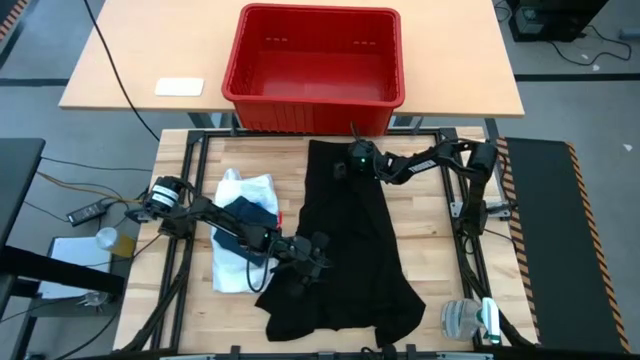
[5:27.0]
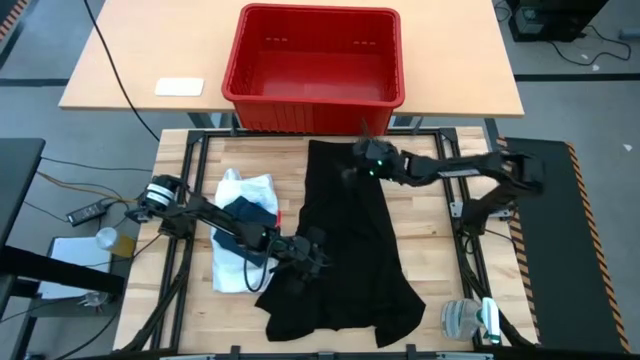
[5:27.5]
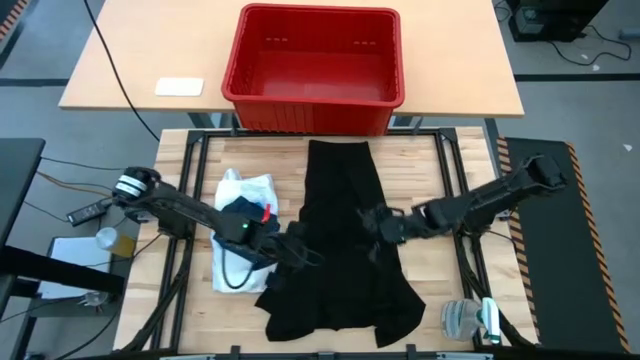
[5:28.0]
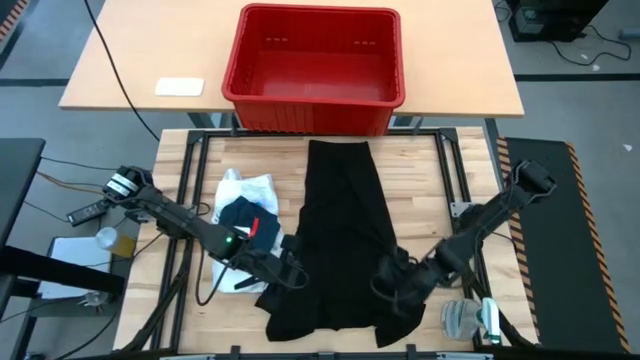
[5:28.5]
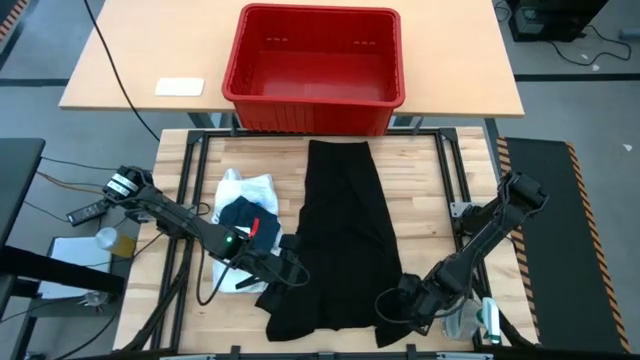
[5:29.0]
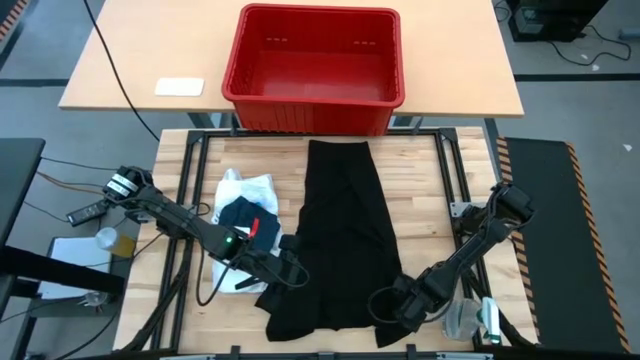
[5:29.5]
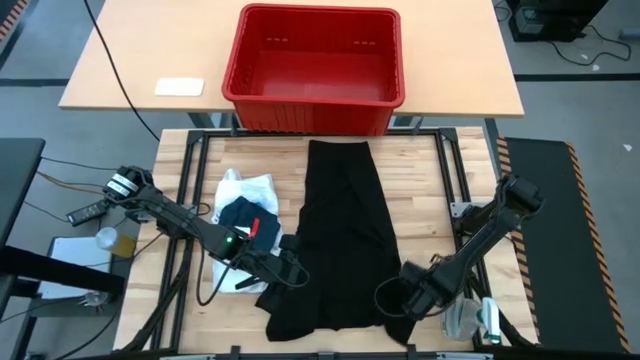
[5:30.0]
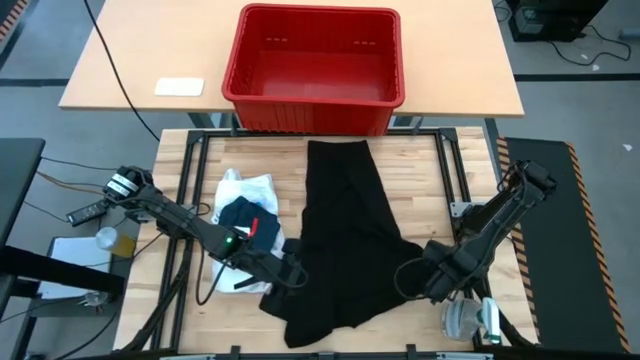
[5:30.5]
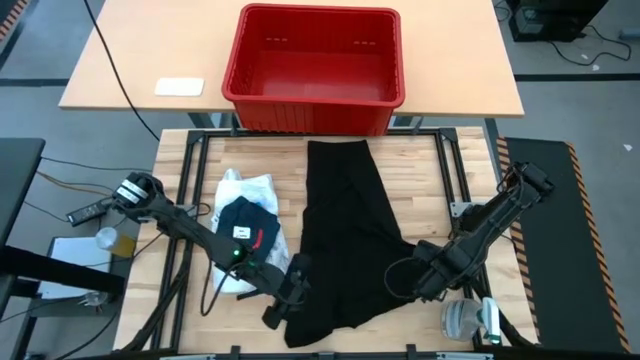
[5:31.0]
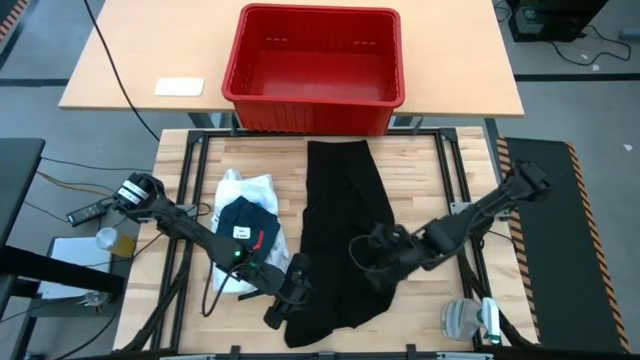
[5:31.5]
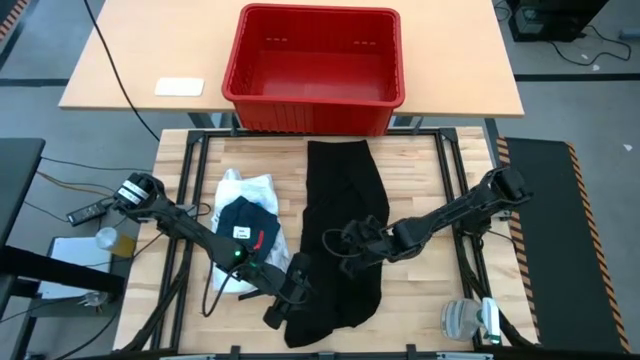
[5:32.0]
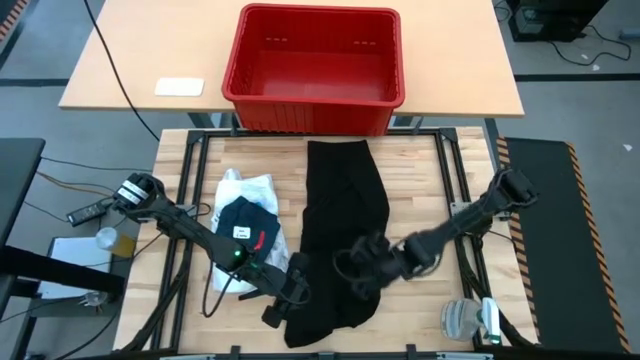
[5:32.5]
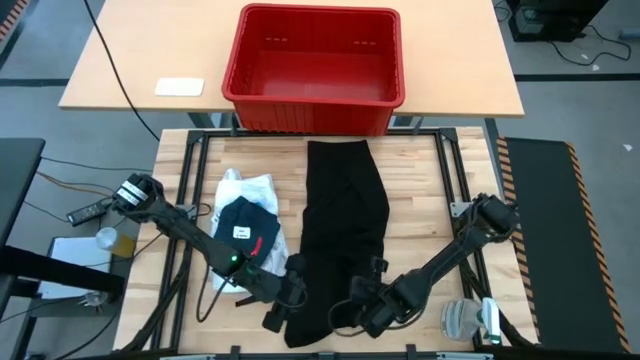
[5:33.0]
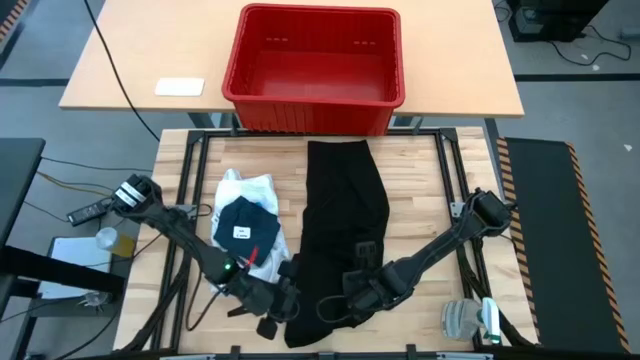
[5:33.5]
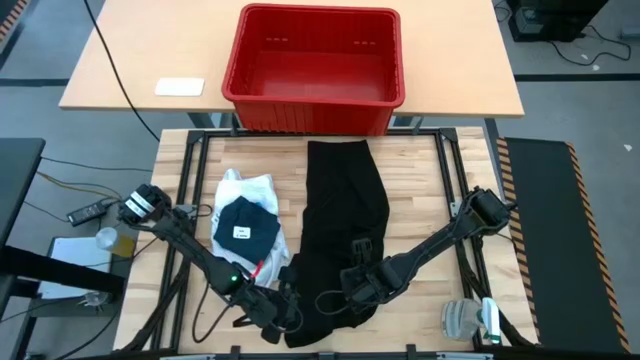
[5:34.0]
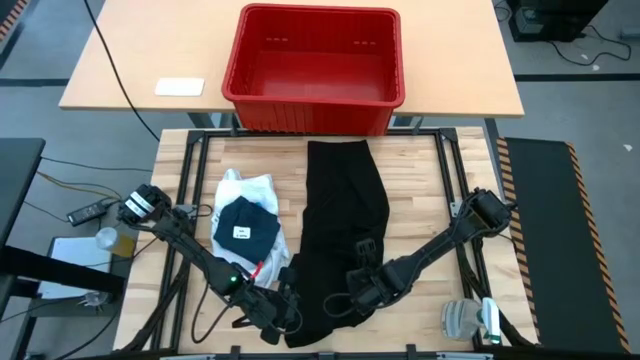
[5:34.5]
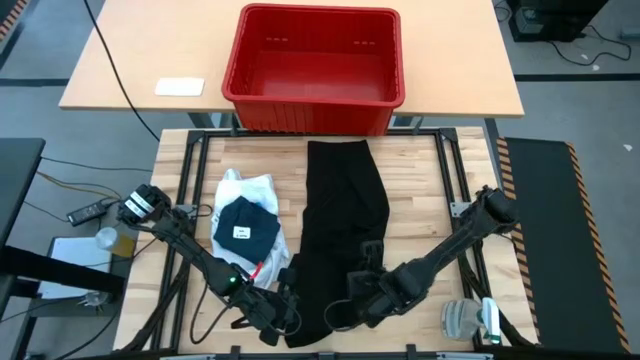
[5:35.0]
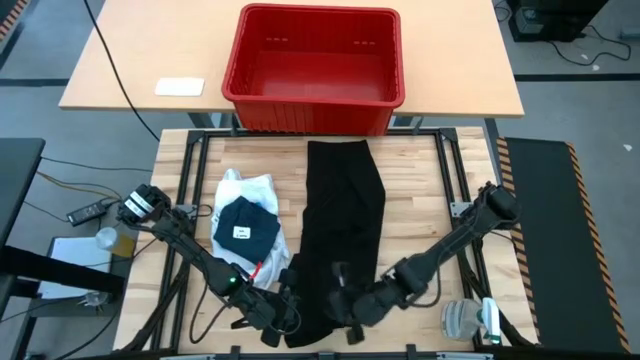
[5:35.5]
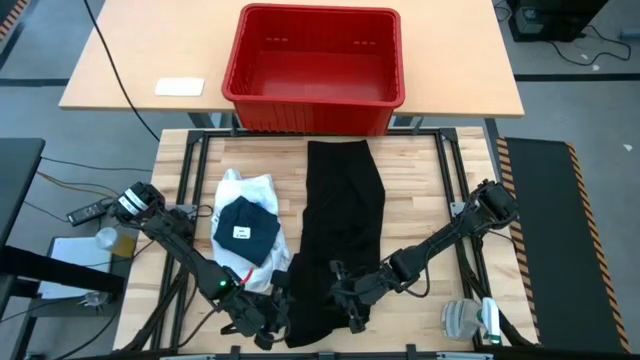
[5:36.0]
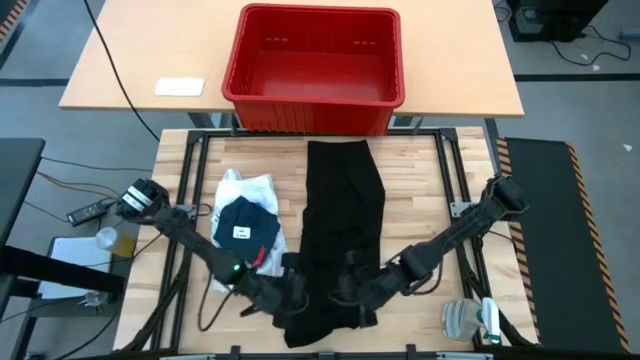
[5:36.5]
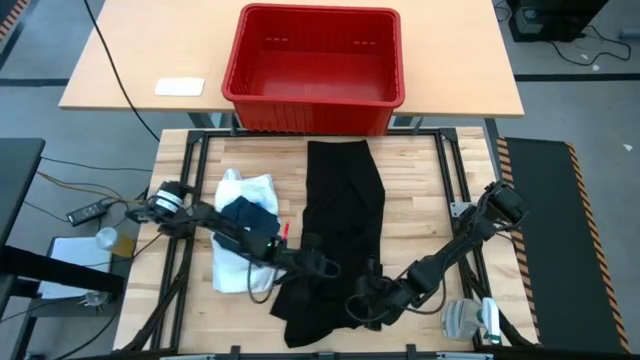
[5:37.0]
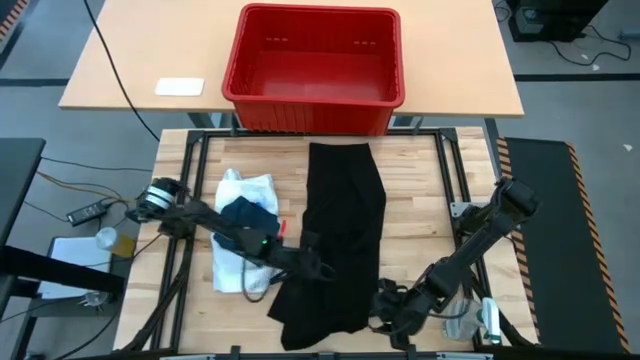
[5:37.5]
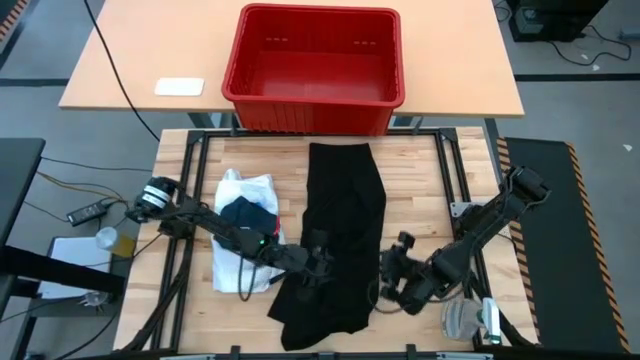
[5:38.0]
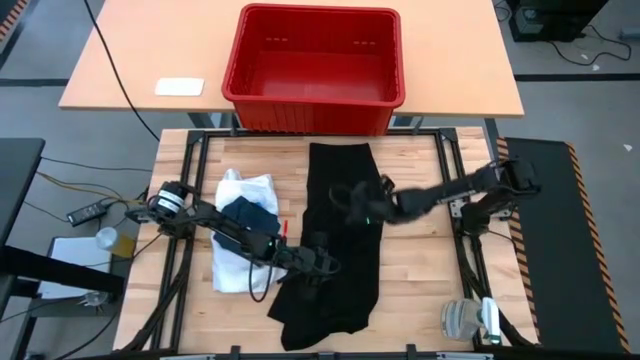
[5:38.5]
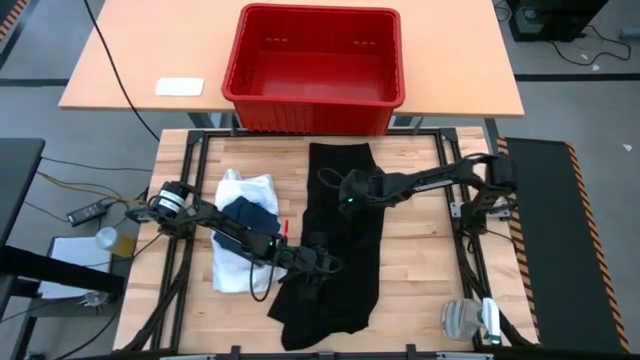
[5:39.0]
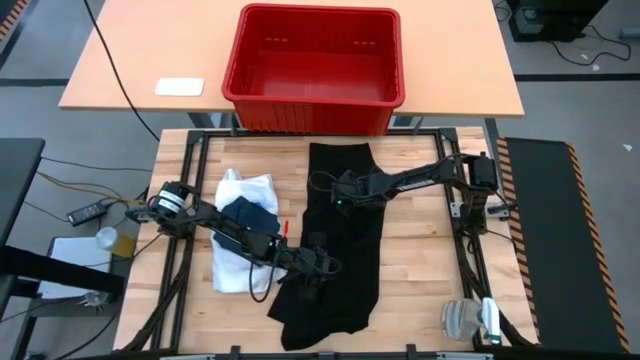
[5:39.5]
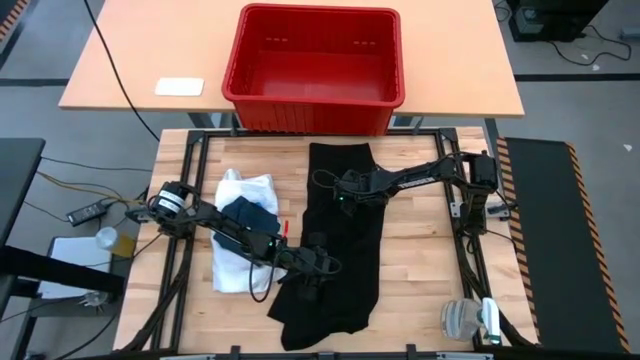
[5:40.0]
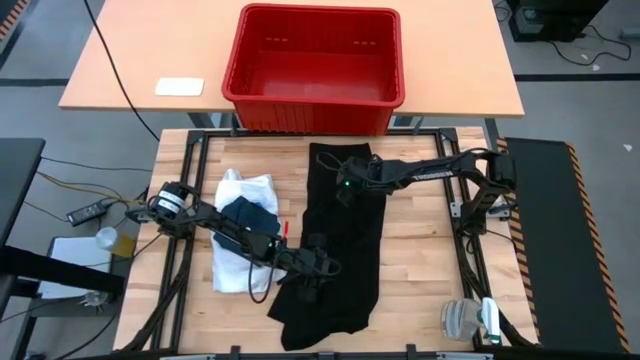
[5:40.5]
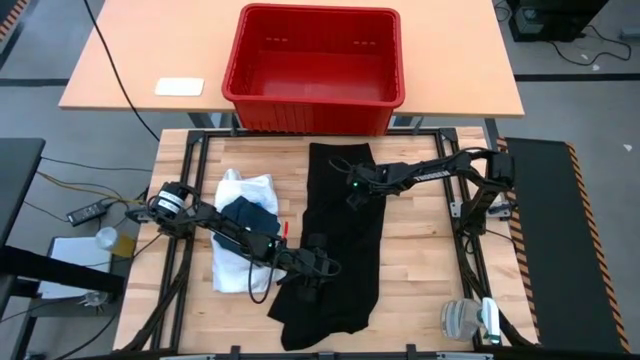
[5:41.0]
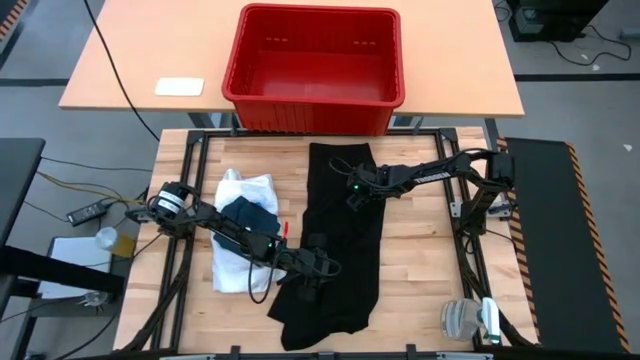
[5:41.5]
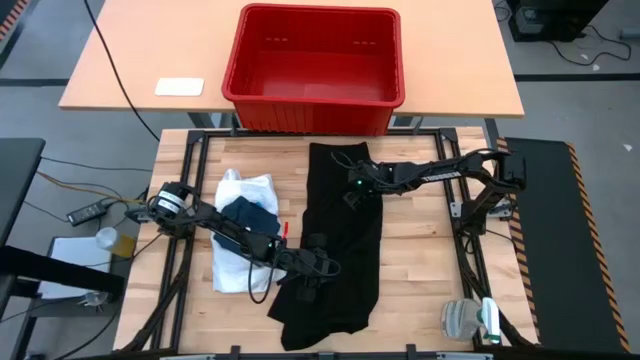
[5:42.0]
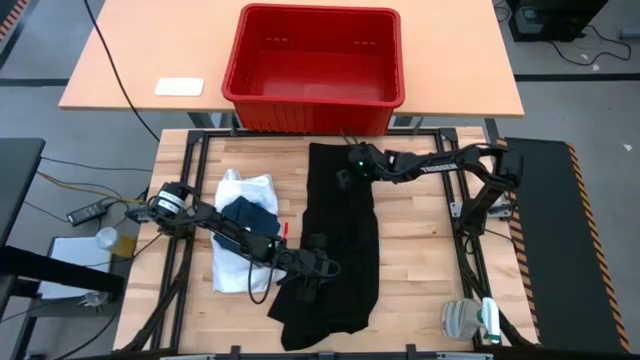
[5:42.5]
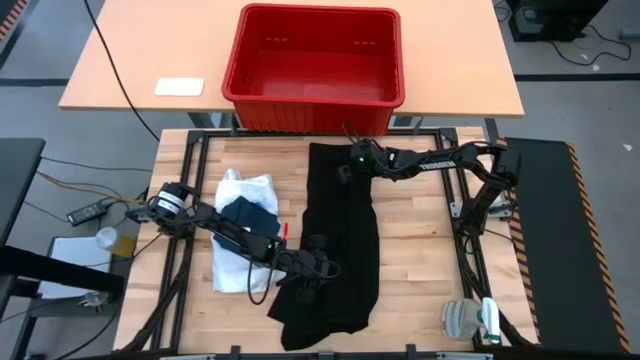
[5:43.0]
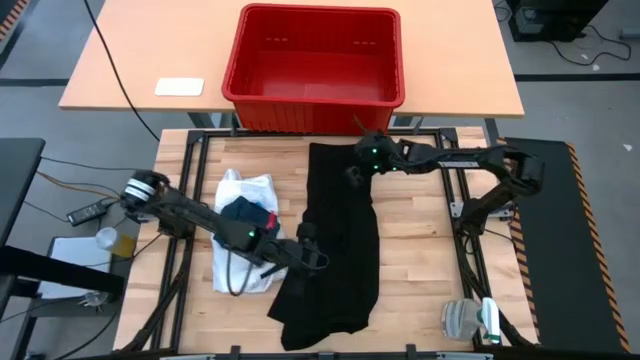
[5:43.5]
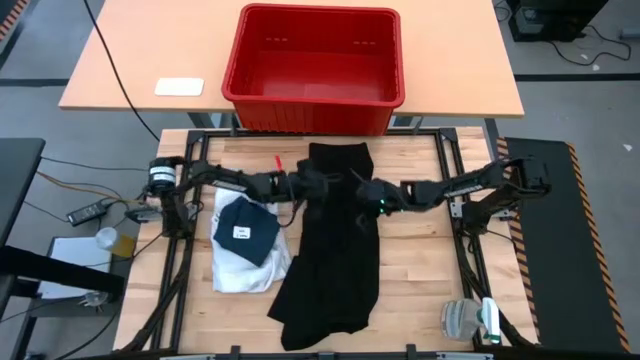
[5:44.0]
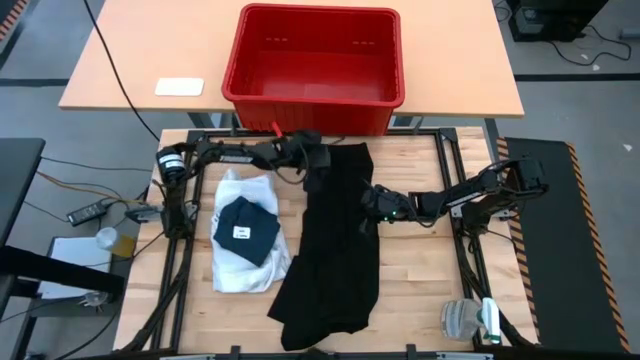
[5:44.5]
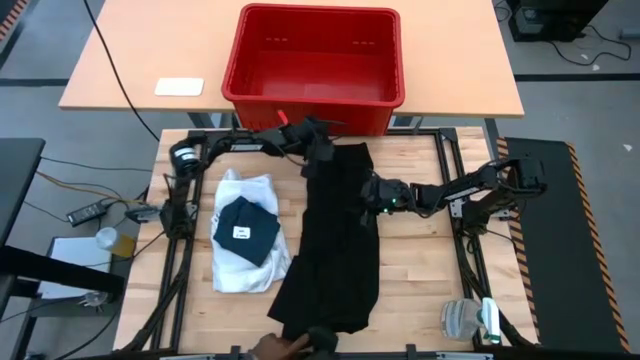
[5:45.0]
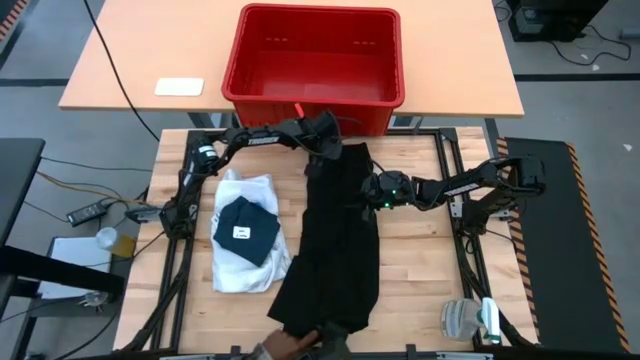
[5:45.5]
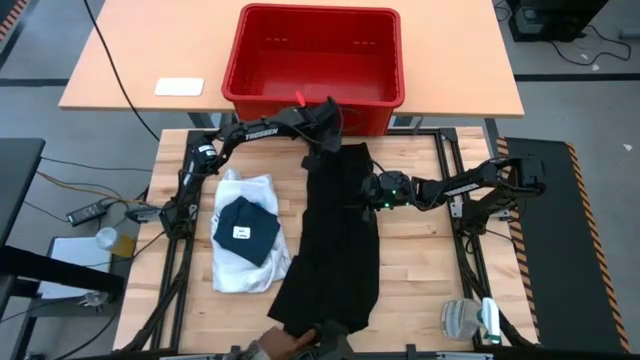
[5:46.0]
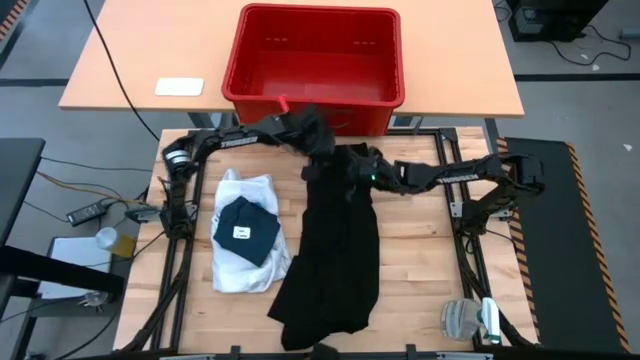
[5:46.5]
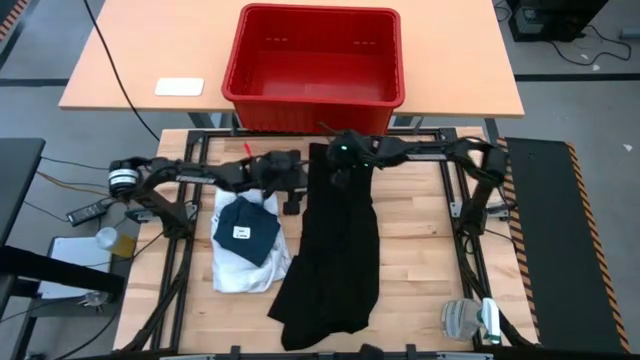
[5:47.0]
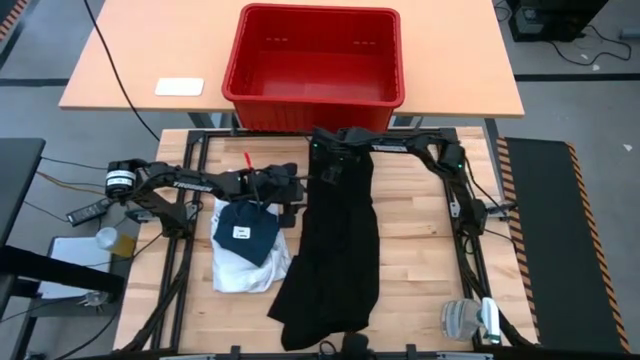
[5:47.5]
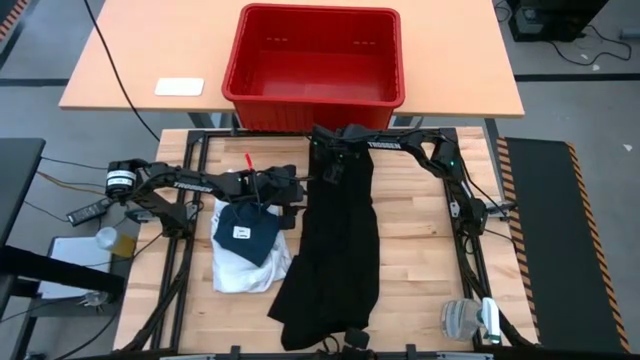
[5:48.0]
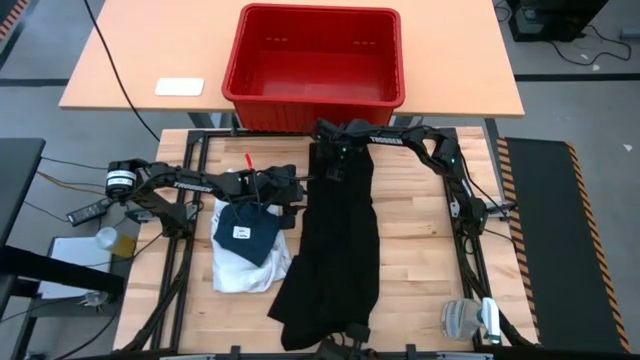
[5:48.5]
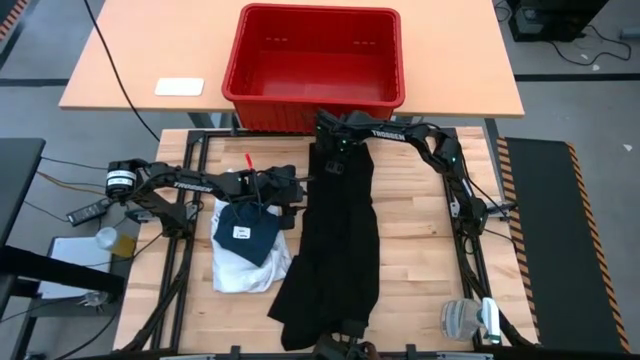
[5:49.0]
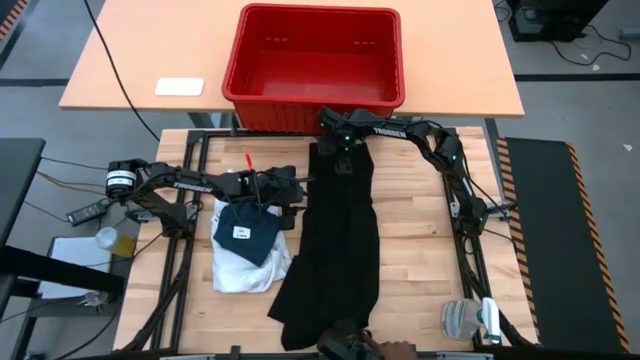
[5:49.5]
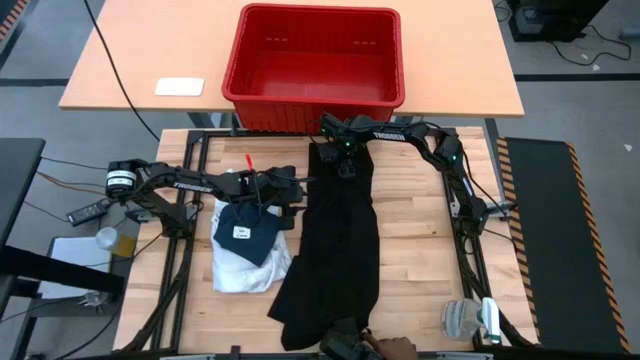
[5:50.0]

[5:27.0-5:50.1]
Task: Fold laundry
Fold the black shirt
